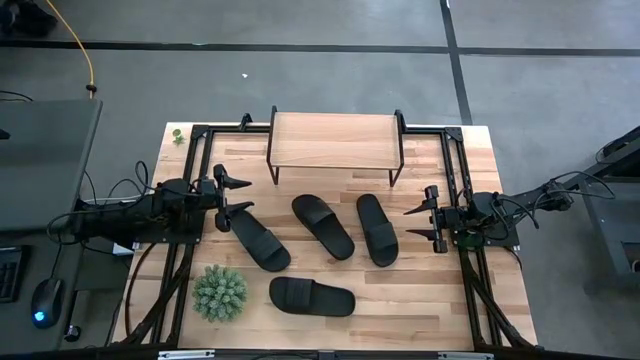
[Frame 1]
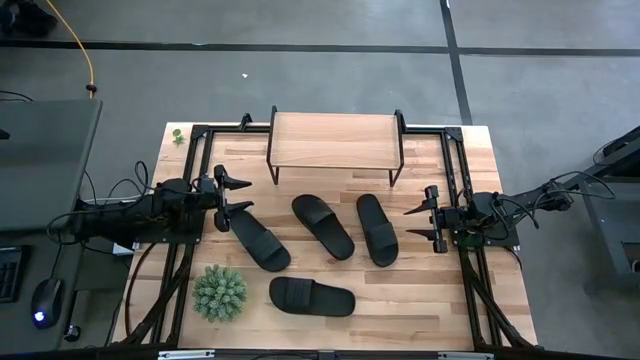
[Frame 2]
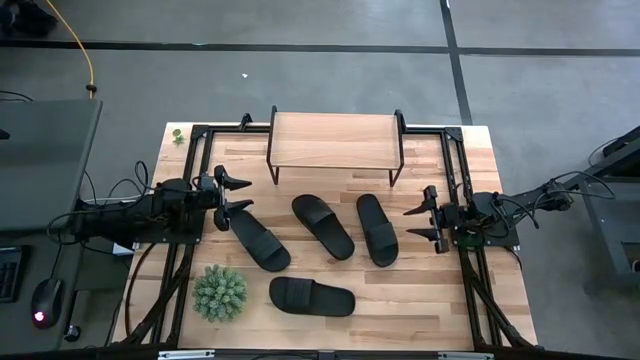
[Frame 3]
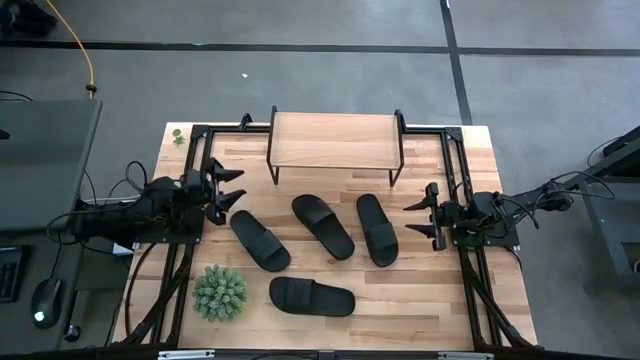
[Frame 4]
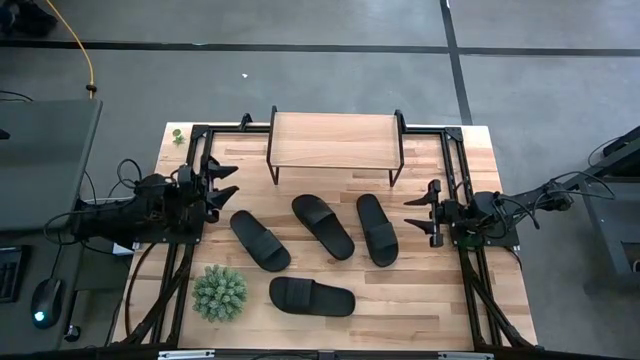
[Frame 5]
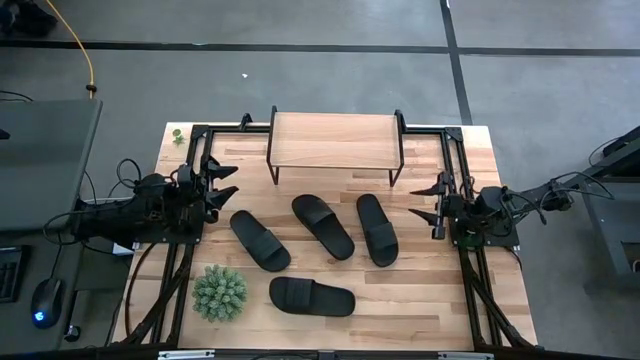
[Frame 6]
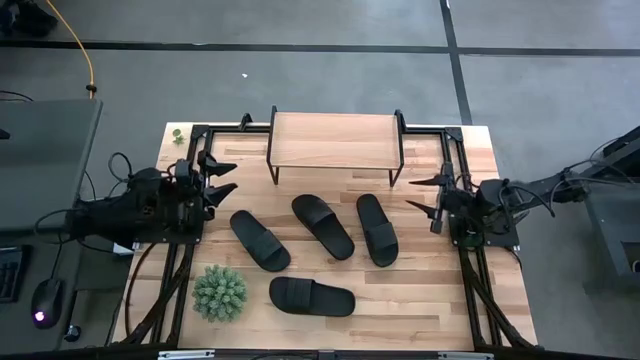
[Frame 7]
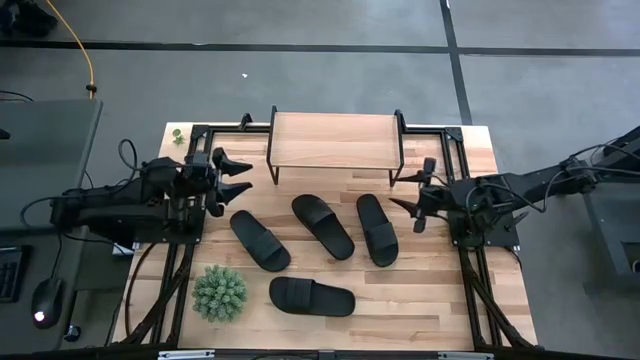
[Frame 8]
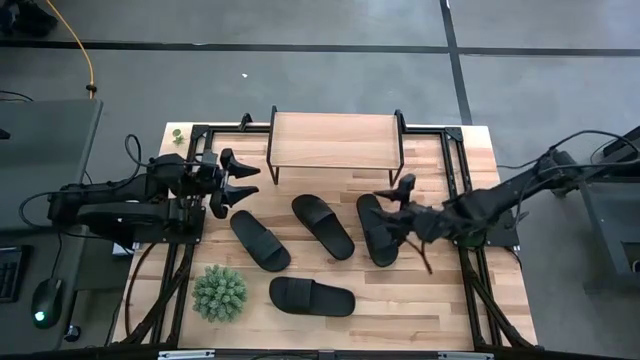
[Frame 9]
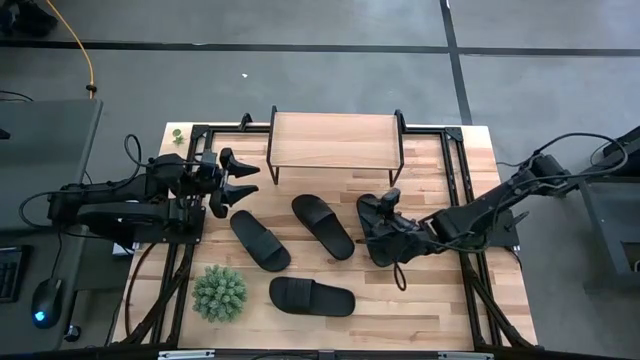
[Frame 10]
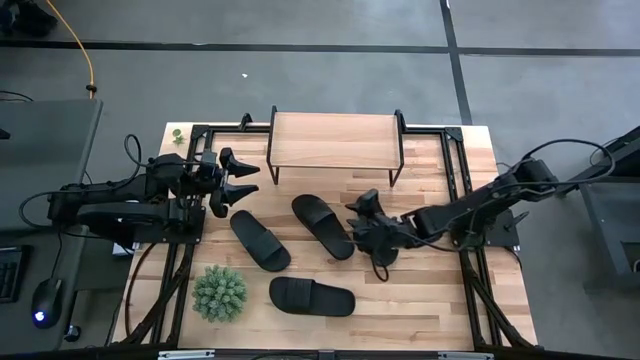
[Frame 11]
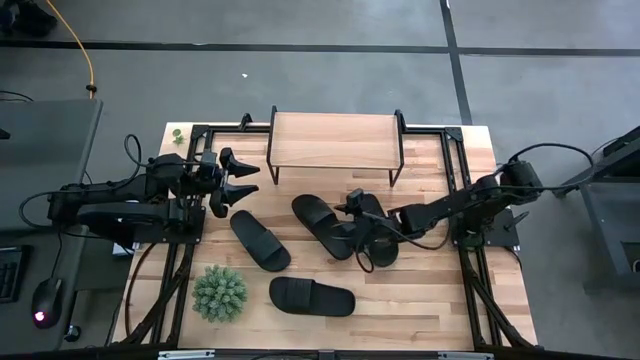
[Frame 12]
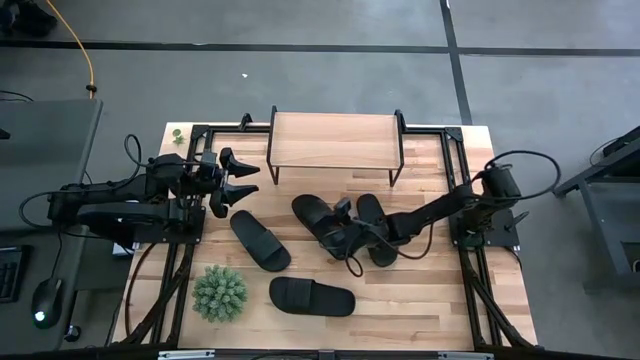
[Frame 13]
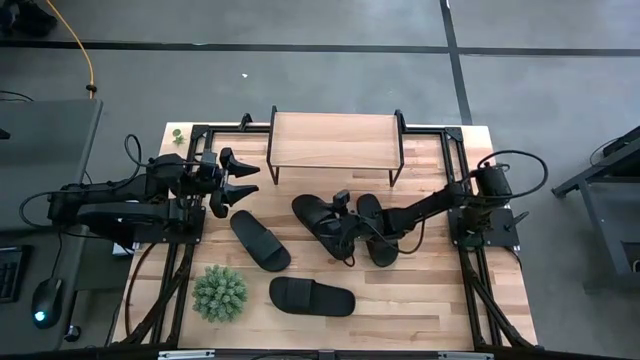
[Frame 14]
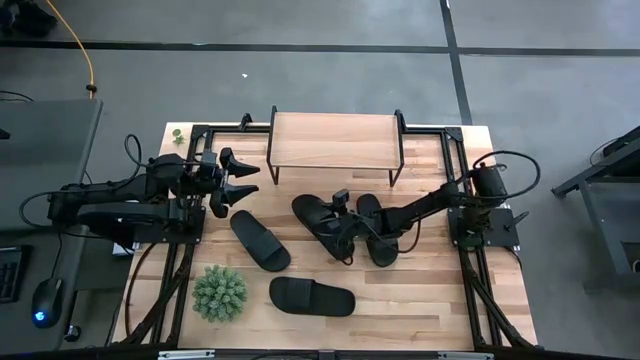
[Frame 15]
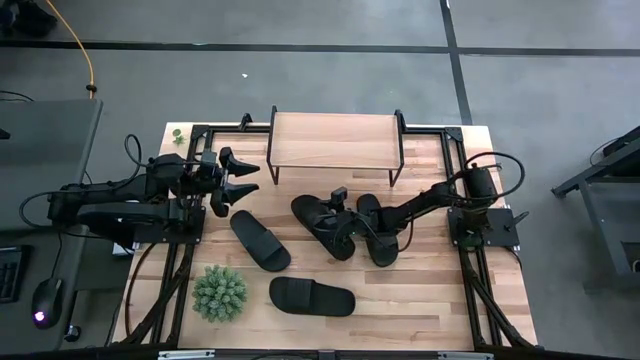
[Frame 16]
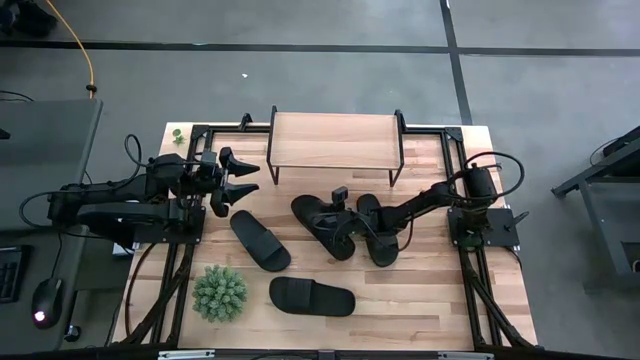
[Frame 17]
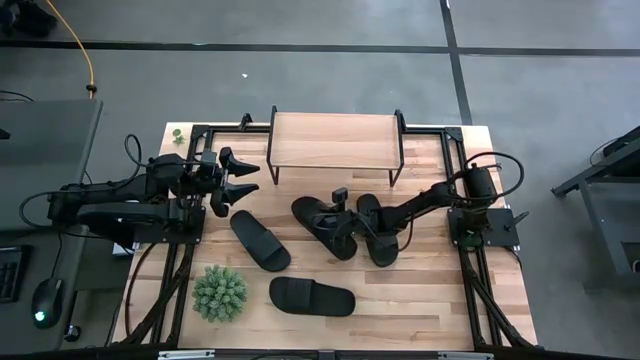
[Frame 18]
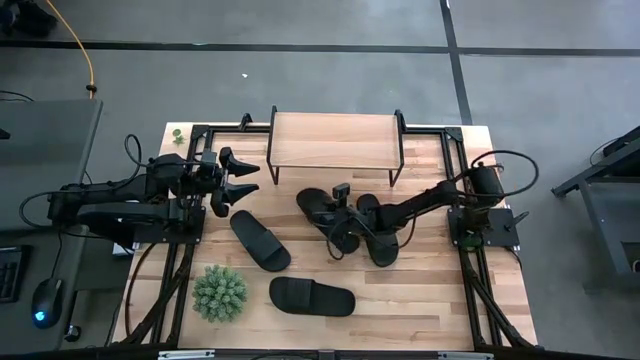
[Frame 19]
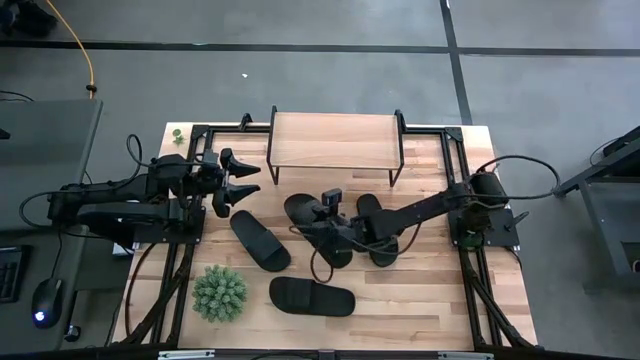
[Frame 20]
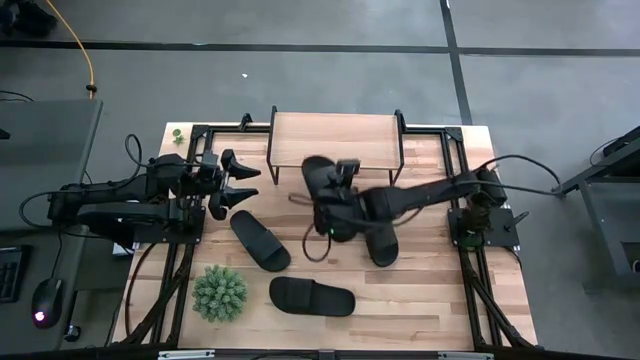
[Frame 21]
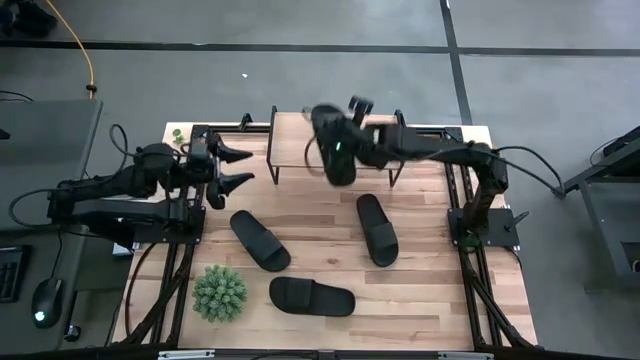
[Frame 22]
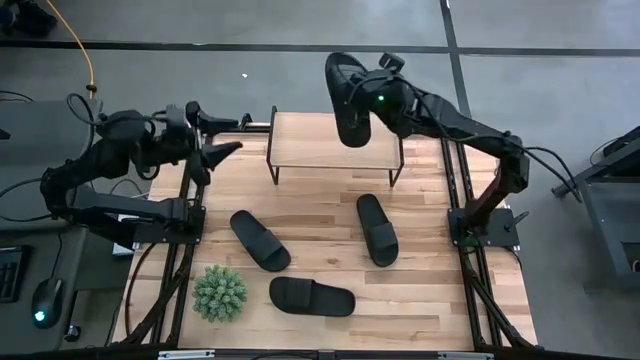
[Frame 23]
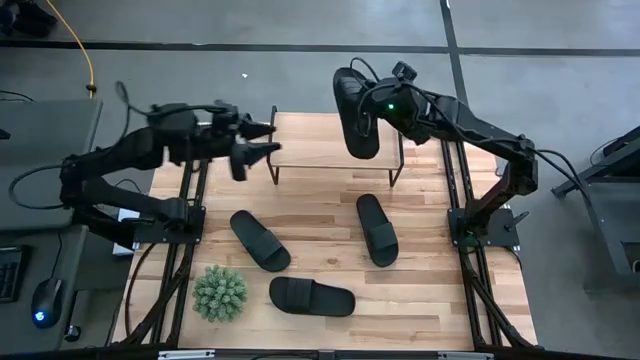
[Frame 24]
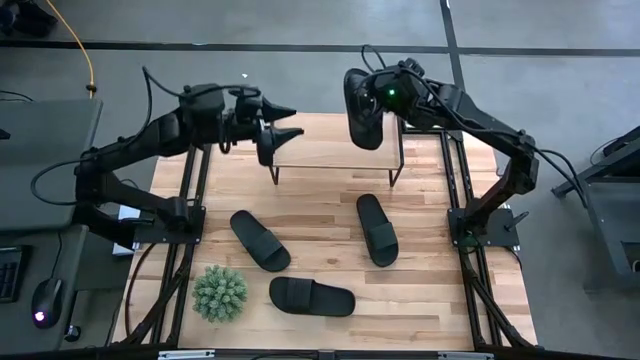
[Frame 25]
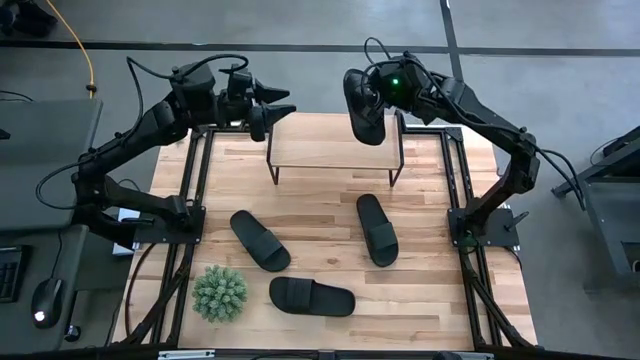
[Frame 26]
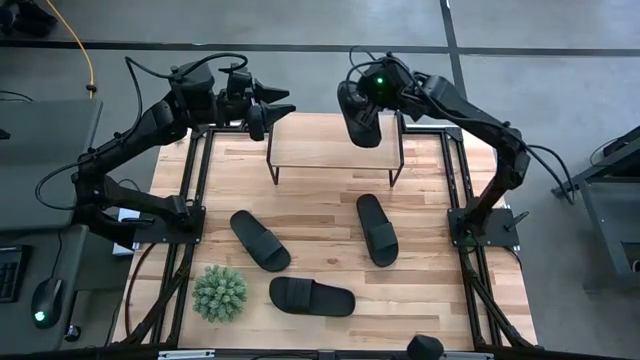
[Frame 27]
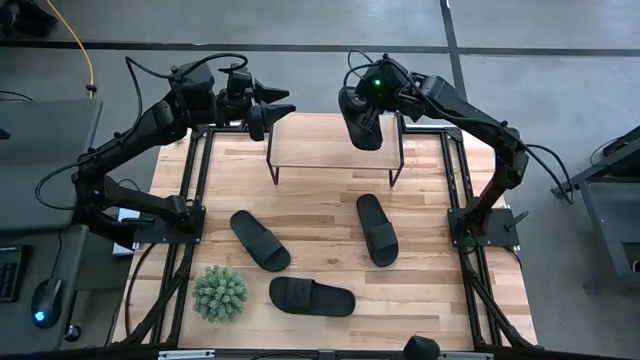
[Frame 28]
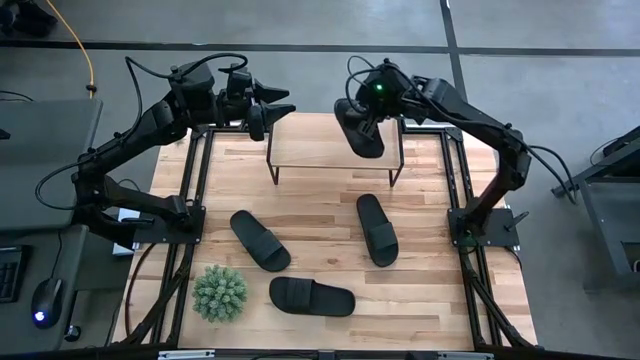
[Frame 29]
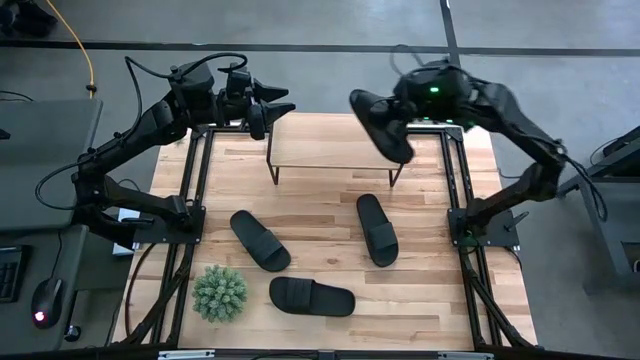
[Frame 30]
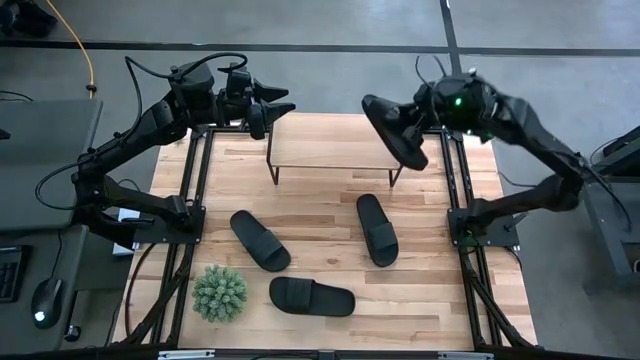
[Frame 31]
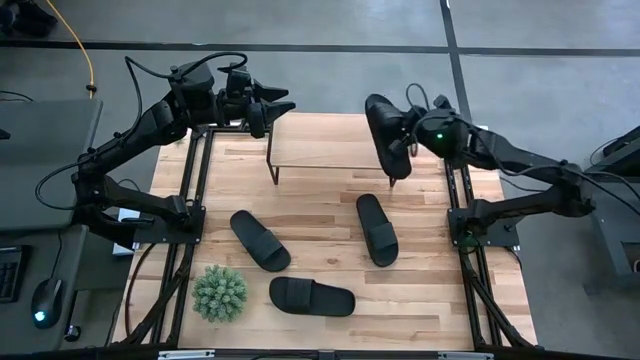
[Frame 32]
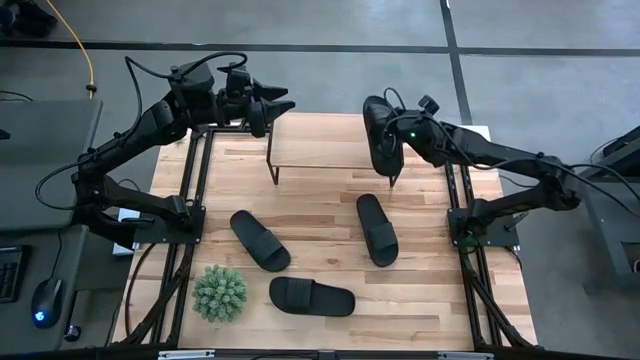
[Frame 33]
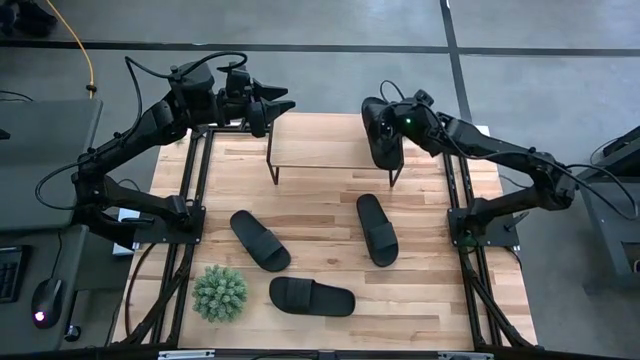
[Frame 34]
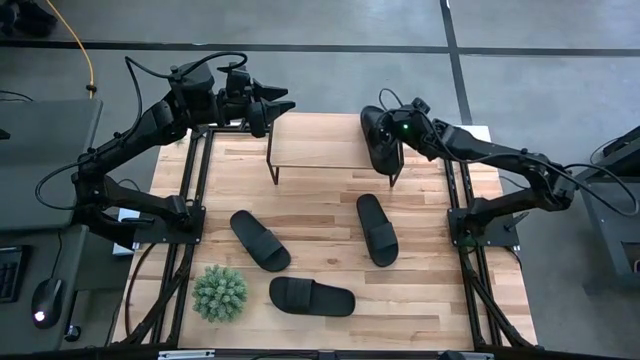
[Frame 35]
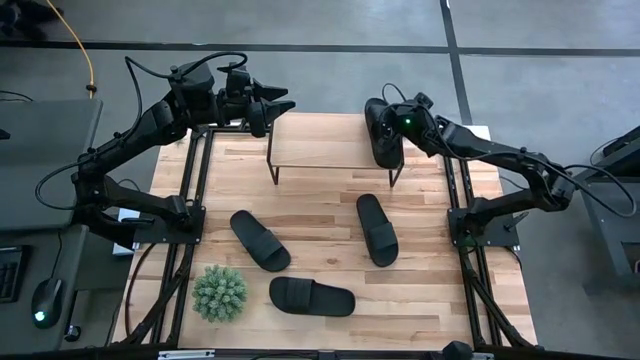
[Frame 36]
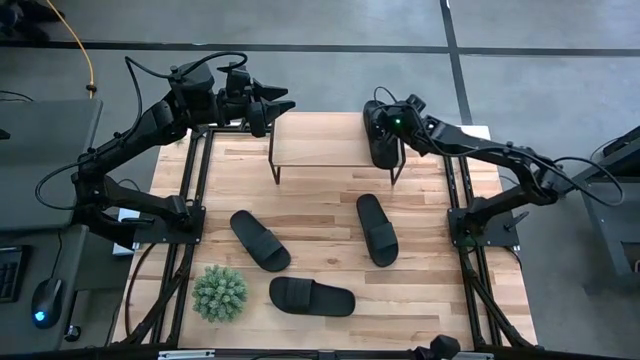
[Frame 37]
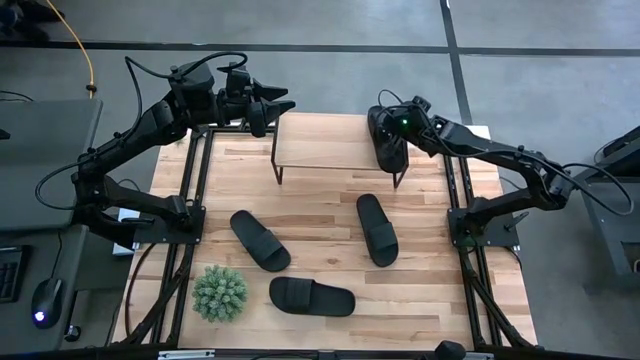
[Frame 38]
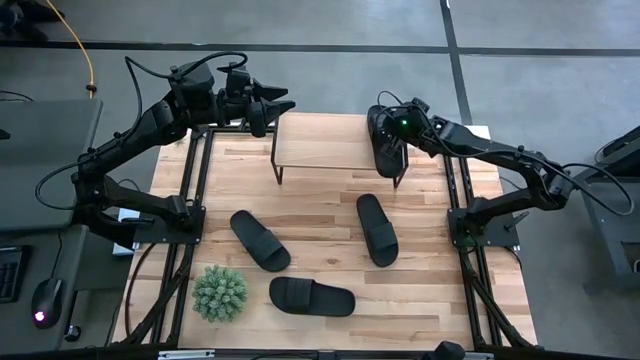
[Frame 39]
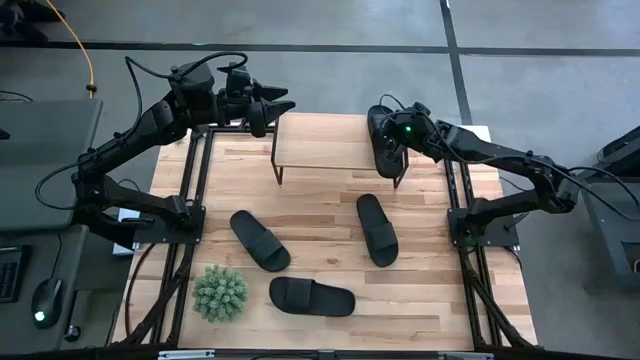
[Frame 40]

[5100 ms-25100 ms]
Task: Pick and place slides into the shelf
Put the black slipper on the shelf
